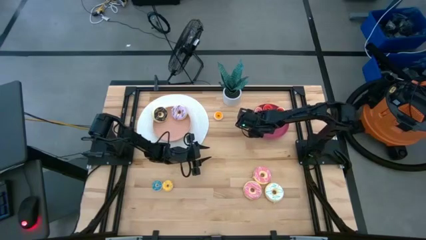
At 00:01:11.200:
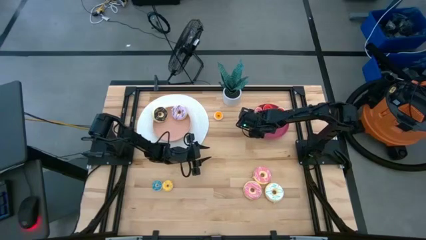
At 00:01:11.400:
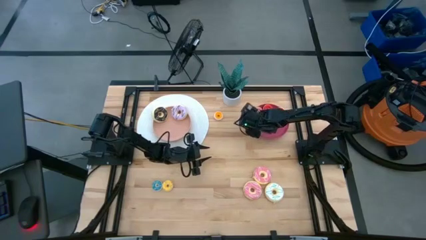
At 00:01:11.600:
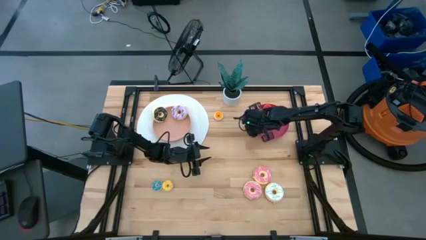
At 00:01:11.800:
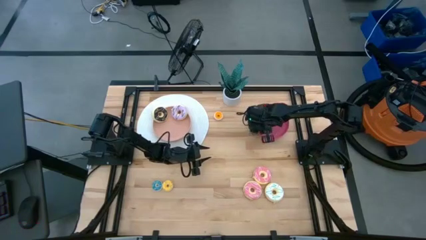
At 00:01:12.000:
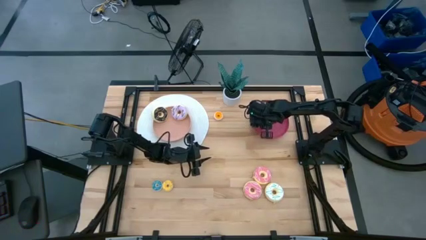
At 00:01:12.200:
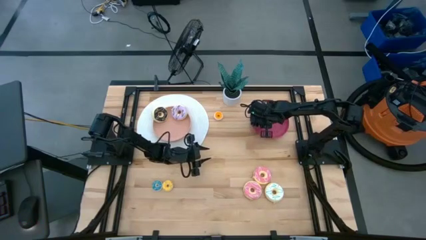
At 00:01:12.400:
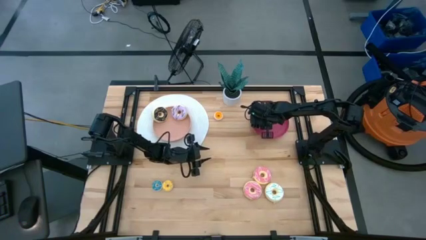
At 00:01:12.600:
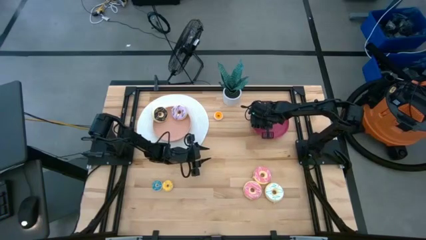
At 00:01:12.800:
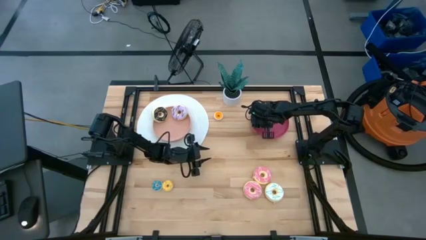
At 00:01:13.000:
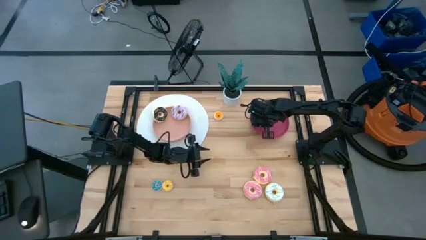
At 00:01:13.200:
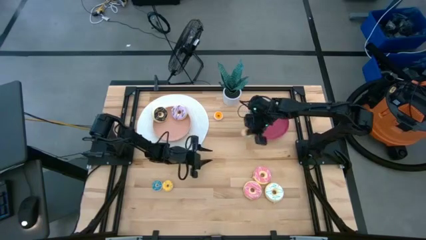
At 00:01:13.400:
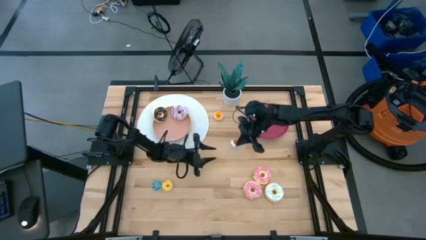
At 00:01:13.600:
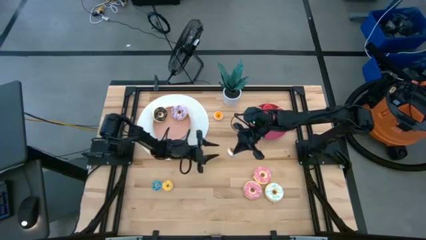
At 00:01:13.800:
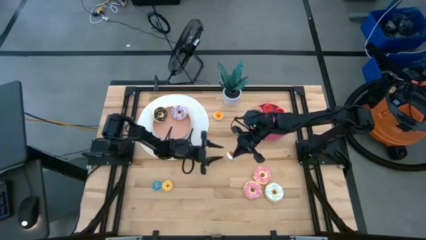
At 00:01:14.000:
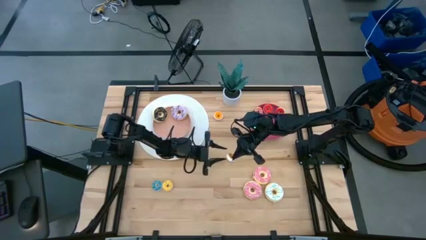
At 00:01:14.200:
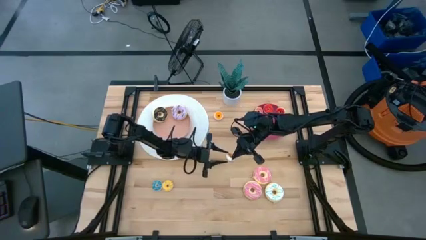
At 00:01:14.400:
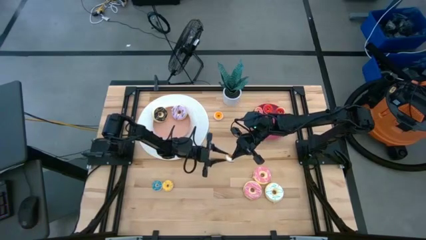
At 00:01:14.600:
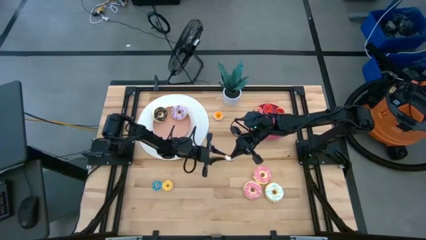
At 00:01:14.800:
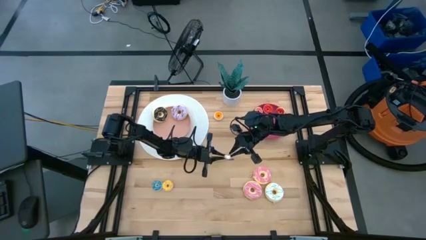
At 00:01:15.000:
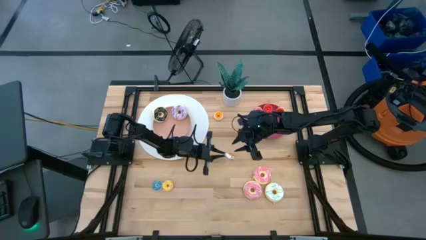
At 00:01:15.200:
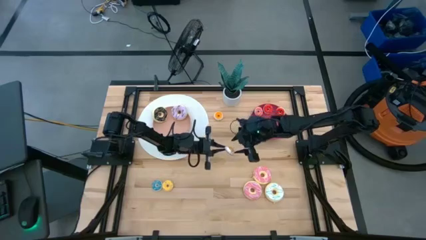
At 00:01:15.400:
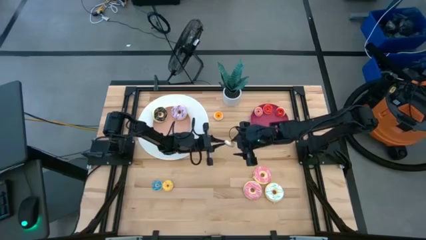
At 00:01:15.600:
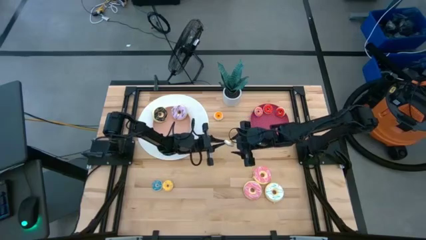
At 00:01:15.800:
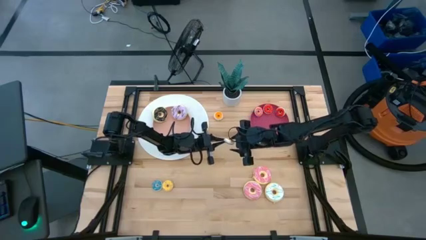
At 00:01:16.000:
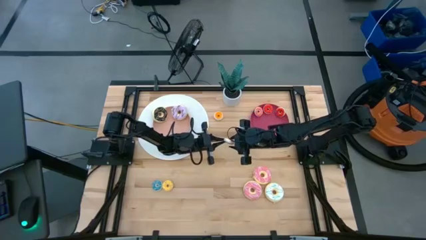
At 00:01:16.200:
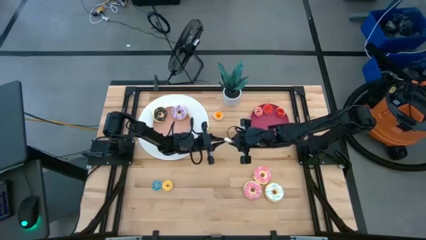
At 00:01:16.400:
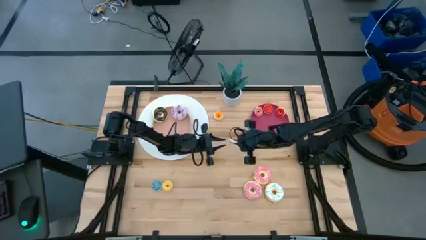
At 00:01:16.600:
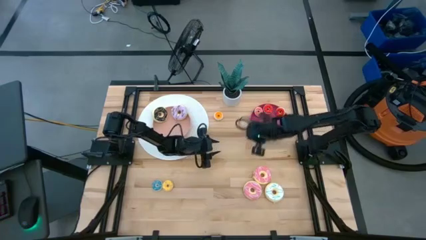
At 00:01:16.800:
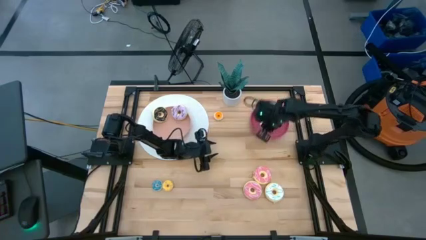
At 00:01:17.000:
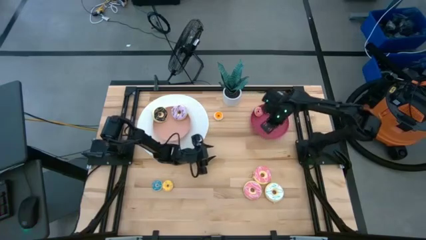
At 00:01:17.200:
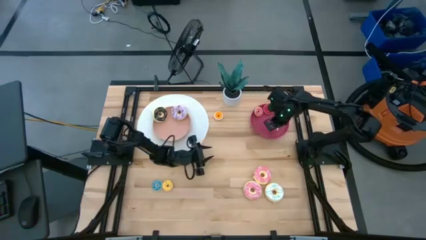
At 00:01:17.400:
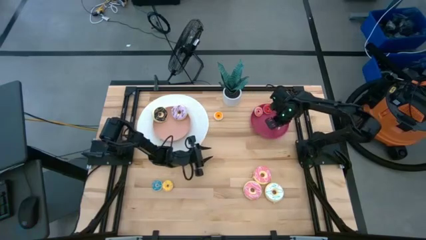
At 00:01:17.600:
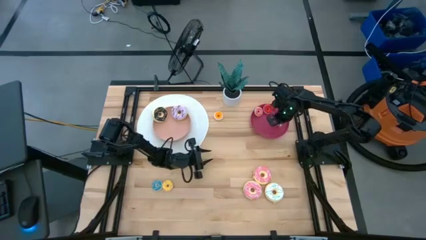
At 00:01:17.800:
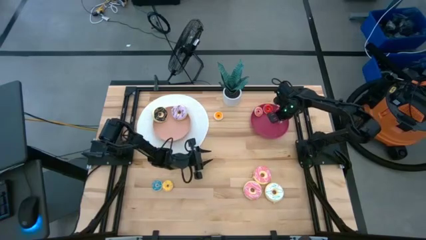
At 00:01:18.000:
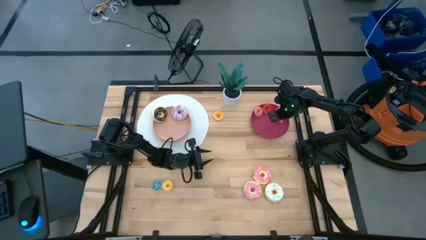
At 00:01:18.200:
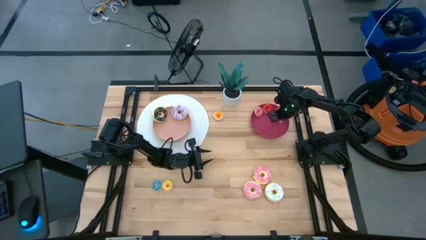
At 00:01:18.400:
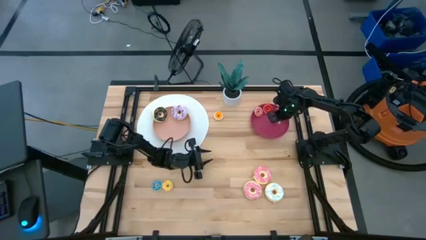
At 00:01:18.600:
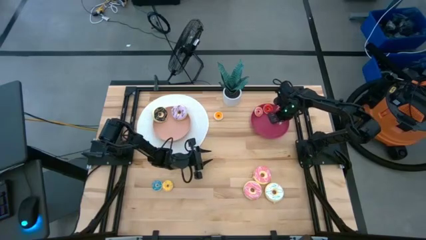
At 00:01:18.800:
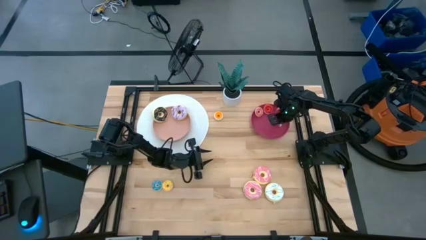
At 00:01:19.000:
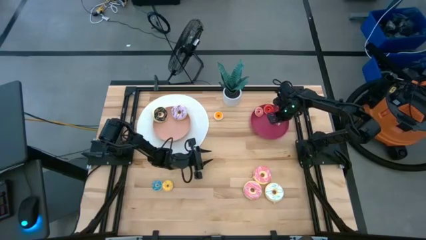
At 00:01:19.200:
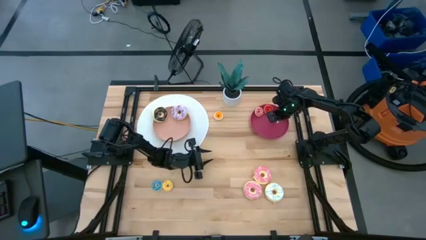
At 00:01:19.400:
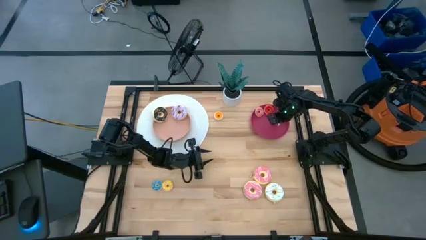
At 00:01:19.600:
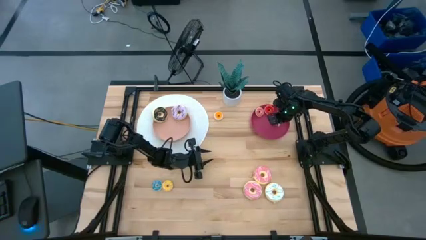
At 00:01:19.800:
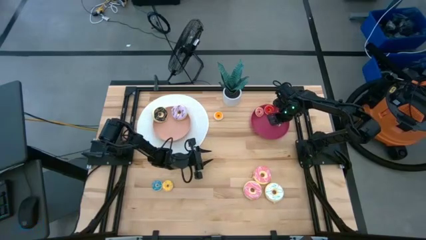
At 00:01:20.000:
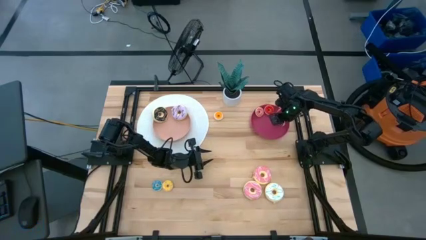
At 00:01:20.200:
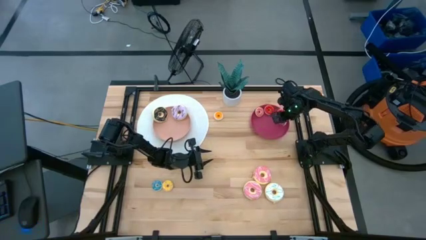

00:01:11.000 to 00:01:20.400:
Task: Pick & Place donuts
Put the small brown donut on the red plate

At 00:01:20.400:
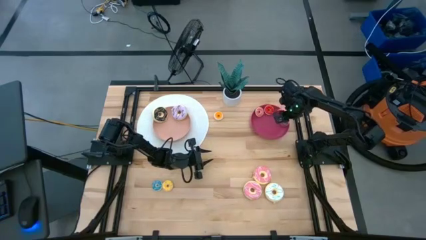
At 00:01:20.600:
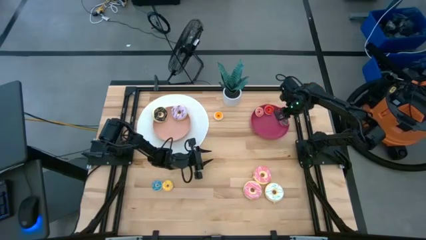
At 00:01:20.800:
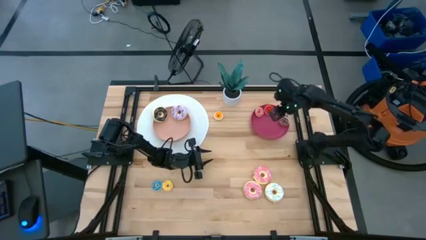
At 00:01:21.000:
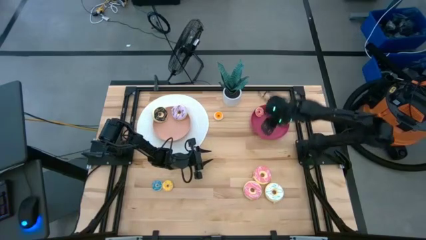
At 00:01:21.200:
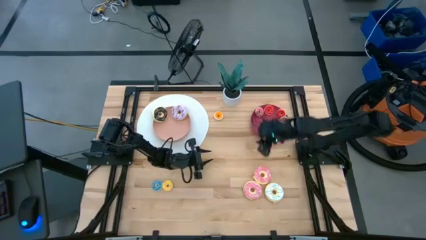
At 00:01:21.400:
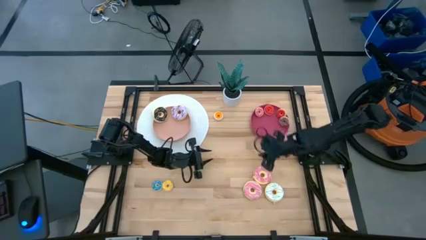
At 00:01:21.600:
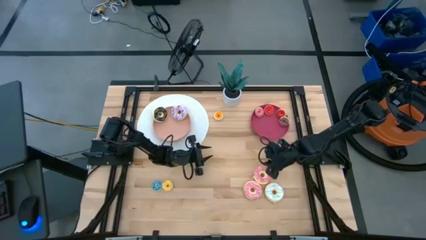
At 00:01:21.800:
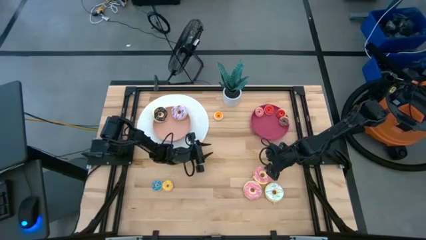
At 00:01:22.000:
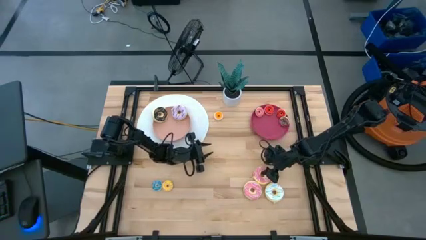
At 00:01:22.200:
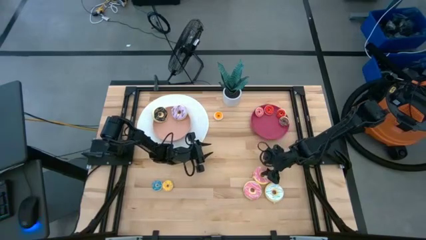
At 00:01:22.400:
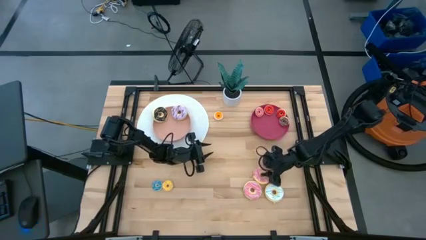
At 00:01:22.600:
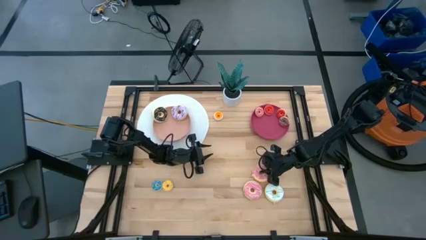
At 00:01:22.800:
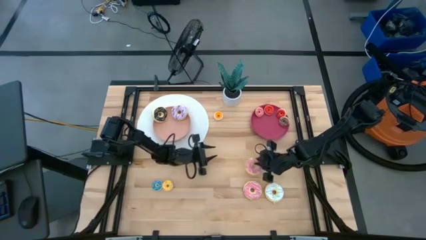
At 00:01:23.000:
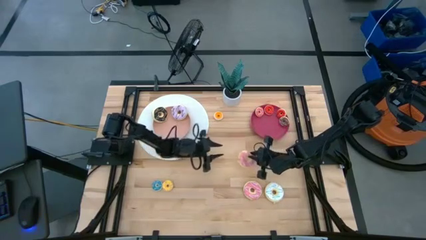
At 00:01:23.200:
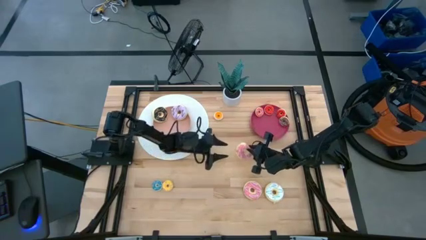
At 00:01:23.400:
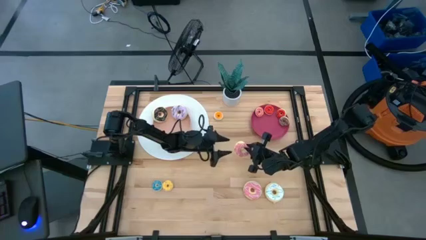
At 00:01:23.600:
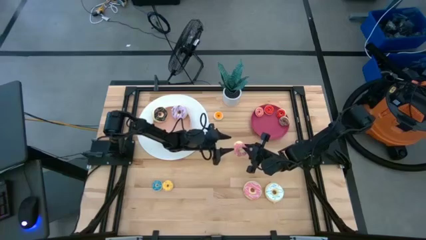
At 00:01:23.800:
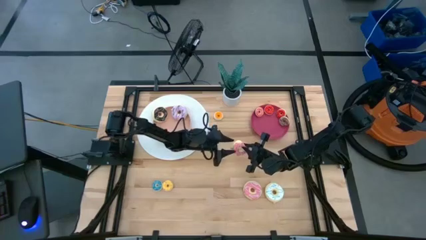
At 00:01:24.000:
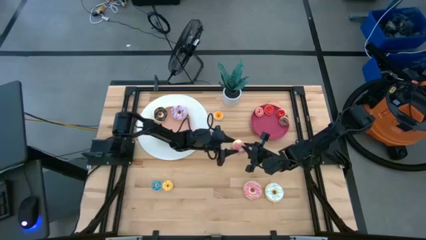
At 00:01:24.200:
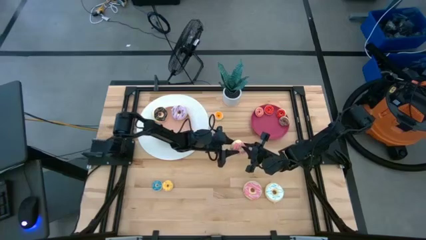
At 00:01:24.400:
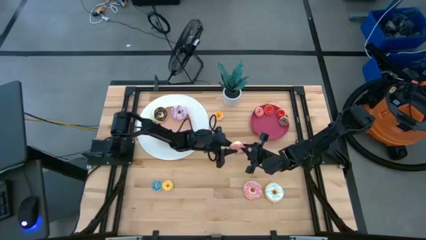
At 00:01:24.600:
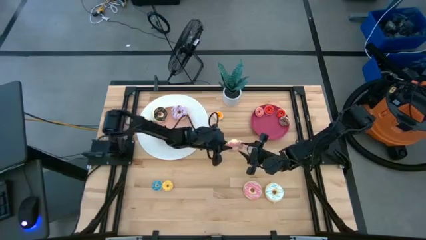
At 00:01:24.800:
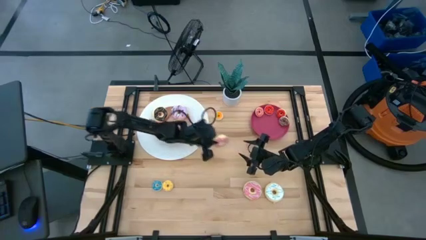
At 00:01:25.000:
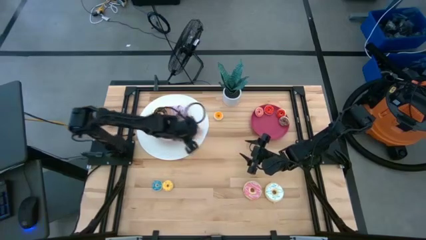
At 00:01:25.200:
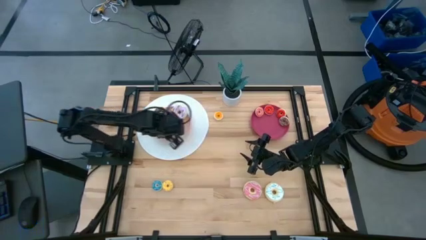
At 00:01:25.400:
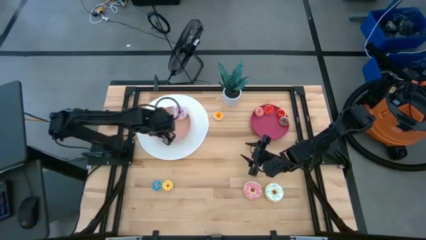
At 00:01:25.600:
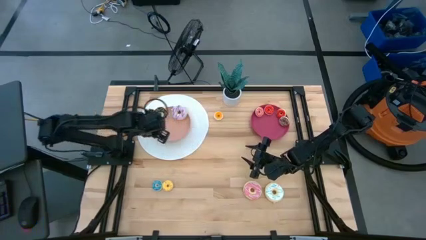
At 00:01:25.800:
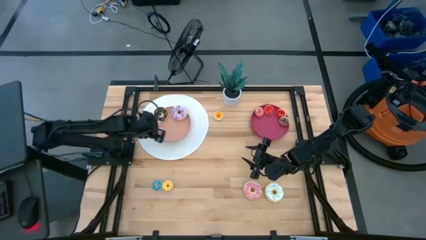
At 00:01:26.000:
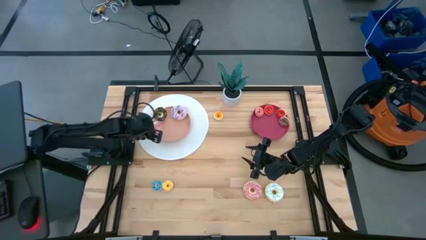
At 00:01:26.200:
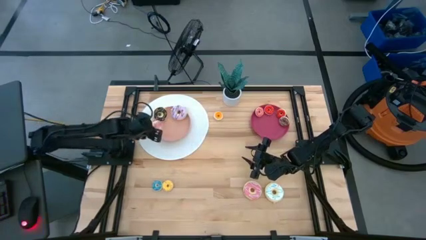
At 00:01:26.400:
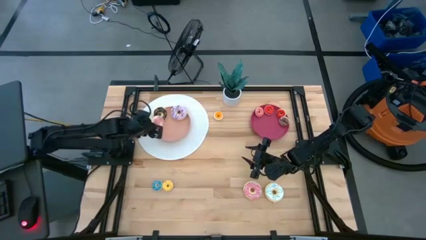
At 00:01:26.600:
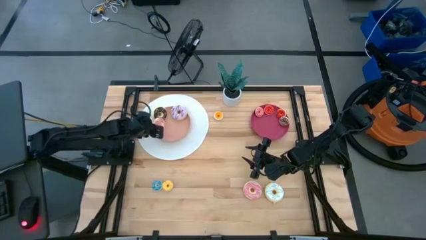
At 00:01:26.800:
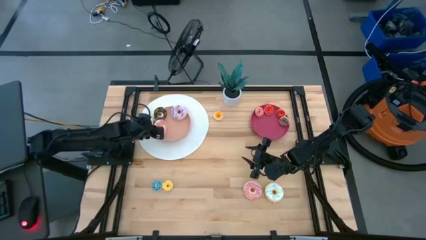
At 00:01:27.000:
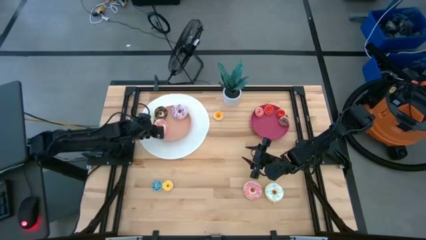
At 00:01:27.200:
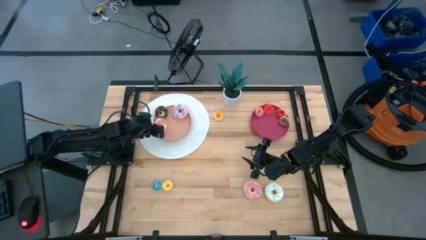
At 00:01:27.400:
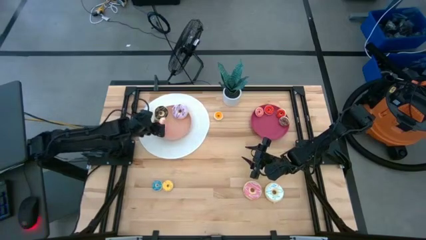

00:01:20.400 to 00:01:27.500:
Put the top large pink donut on the pink plate
